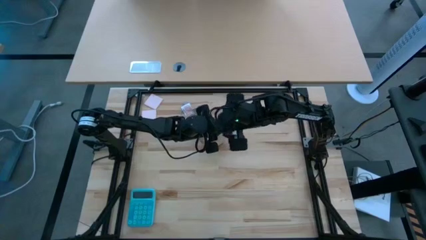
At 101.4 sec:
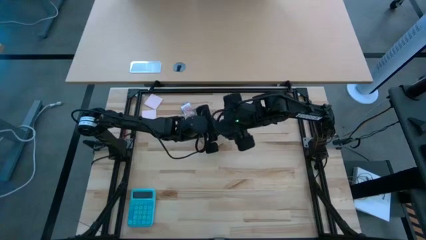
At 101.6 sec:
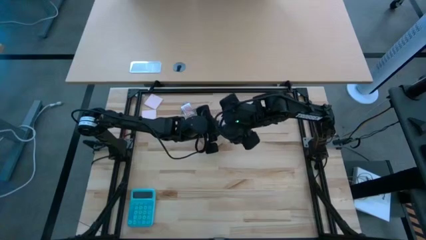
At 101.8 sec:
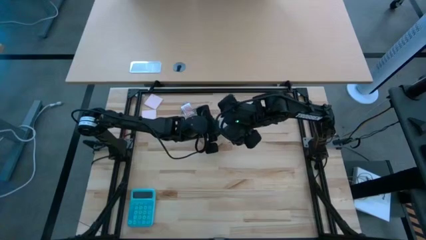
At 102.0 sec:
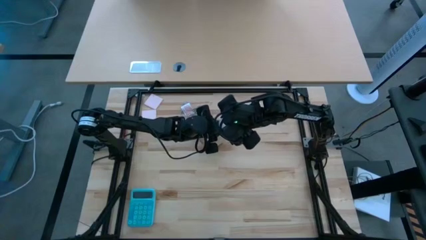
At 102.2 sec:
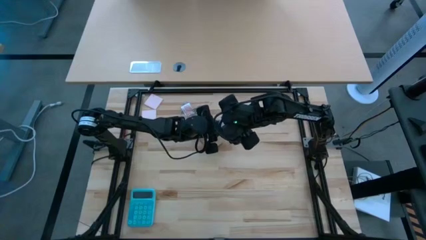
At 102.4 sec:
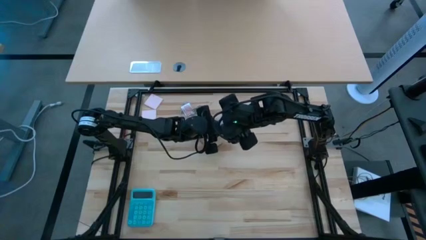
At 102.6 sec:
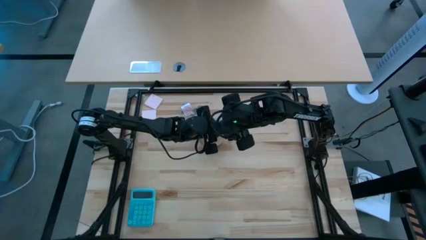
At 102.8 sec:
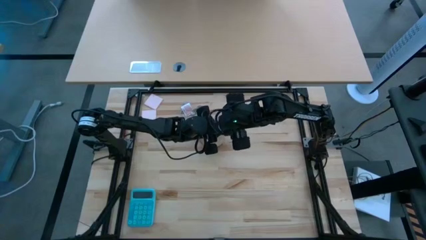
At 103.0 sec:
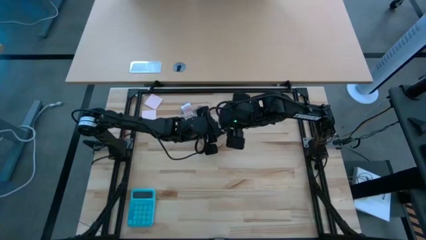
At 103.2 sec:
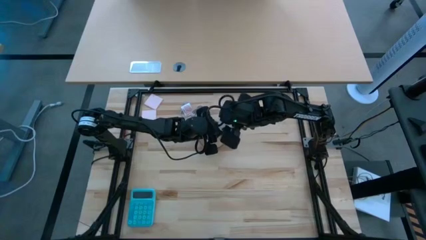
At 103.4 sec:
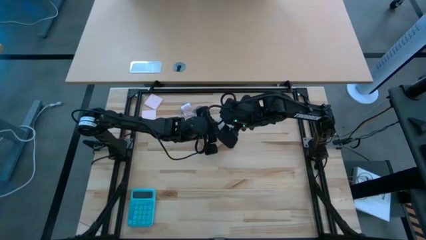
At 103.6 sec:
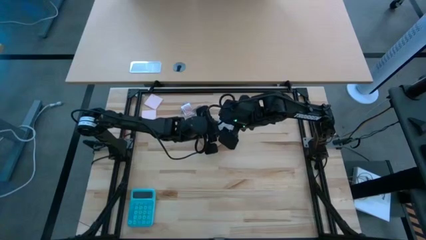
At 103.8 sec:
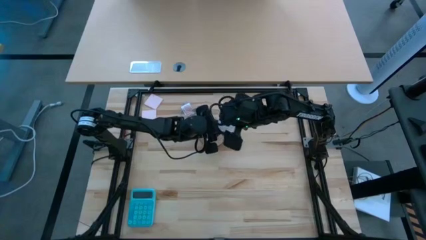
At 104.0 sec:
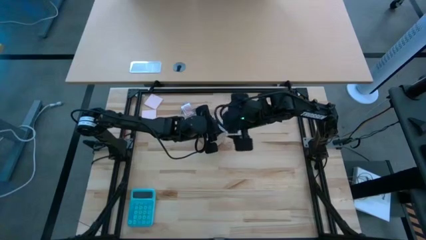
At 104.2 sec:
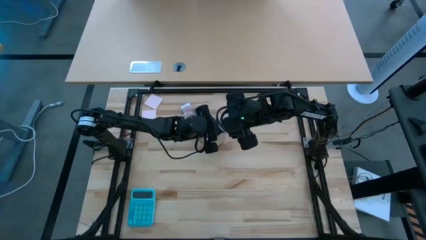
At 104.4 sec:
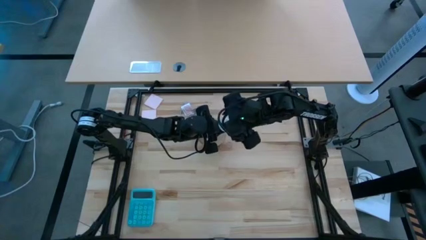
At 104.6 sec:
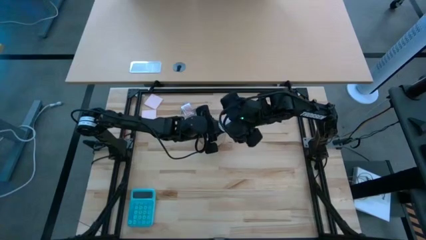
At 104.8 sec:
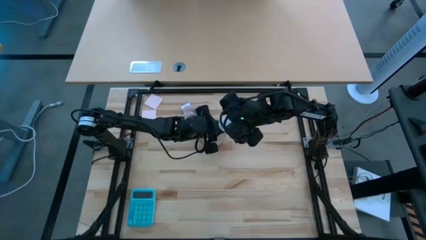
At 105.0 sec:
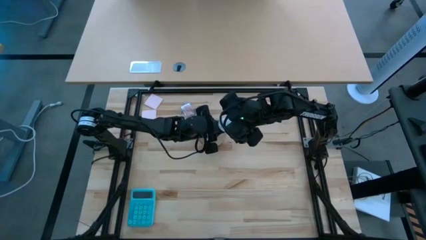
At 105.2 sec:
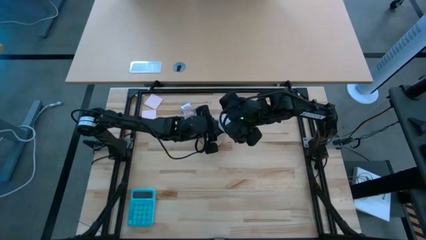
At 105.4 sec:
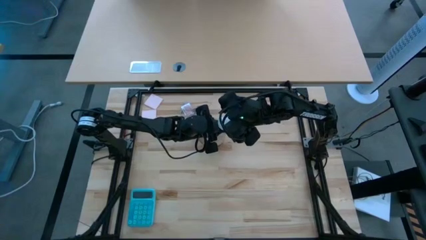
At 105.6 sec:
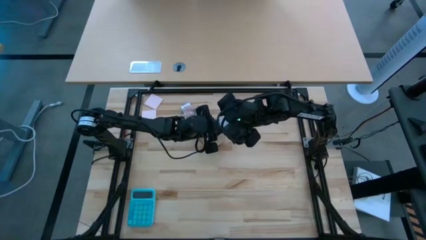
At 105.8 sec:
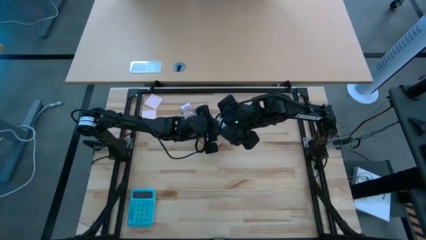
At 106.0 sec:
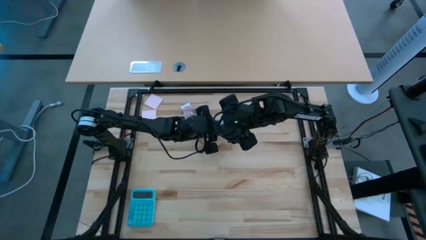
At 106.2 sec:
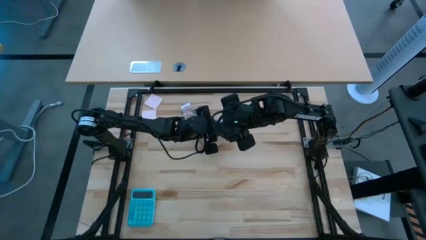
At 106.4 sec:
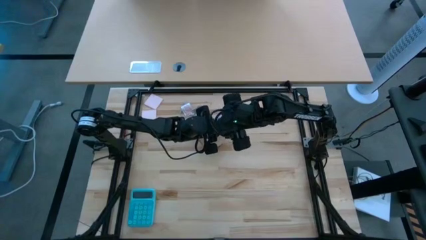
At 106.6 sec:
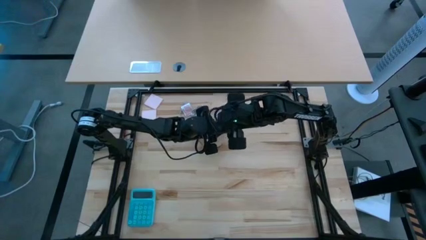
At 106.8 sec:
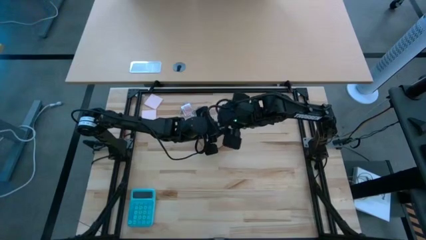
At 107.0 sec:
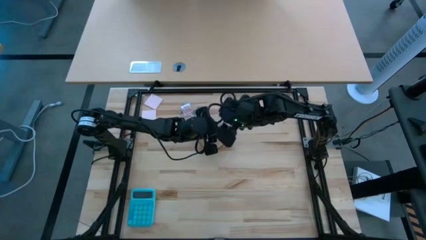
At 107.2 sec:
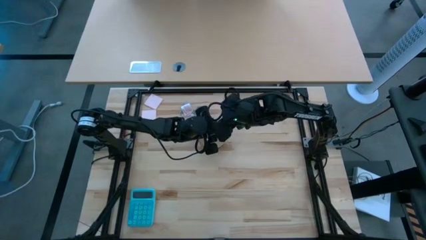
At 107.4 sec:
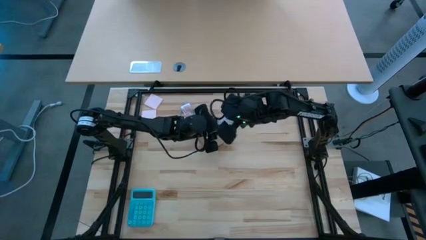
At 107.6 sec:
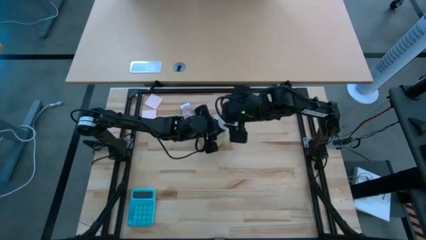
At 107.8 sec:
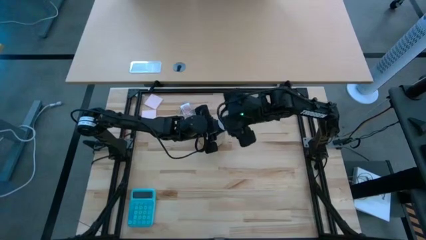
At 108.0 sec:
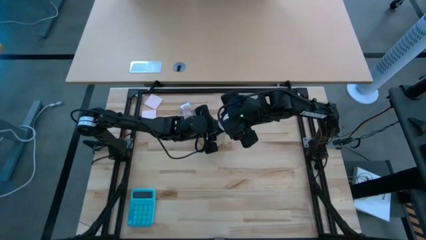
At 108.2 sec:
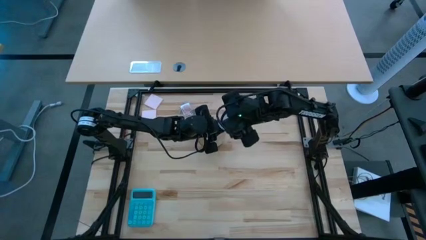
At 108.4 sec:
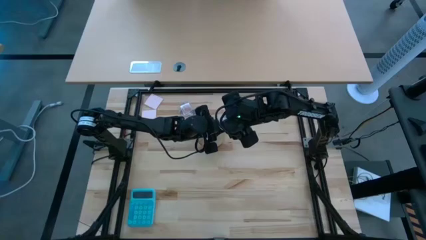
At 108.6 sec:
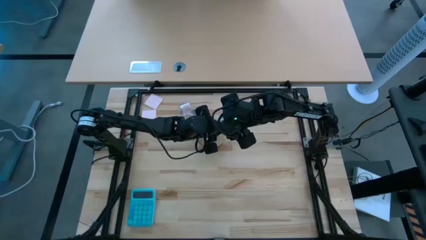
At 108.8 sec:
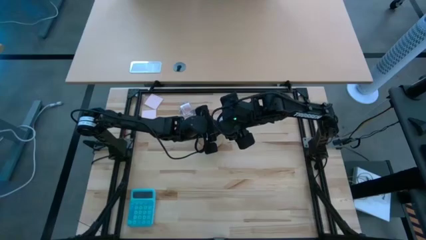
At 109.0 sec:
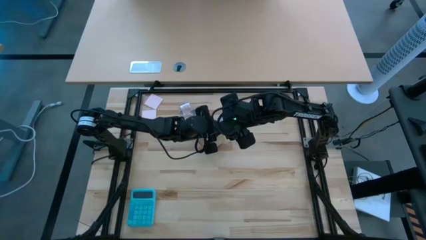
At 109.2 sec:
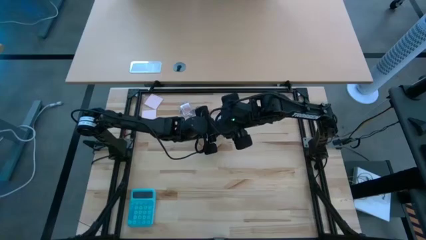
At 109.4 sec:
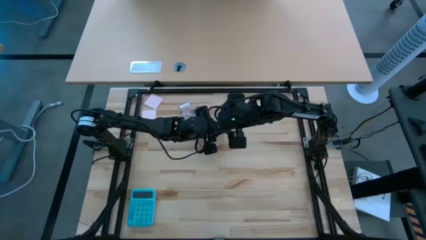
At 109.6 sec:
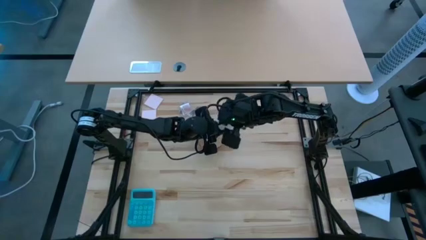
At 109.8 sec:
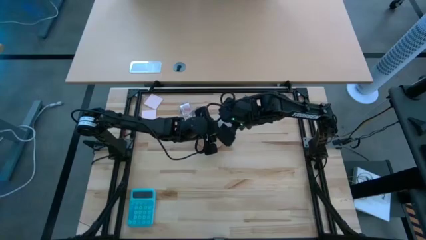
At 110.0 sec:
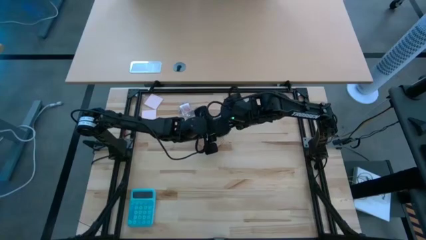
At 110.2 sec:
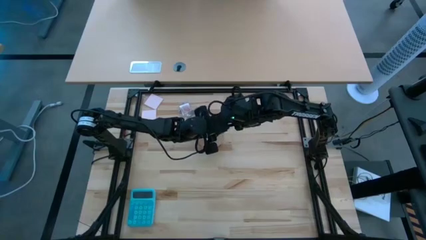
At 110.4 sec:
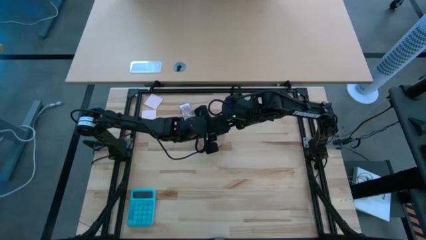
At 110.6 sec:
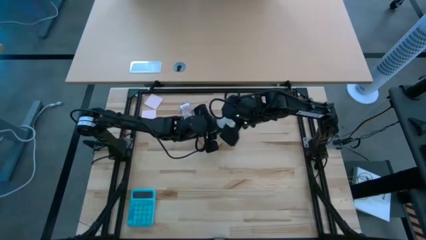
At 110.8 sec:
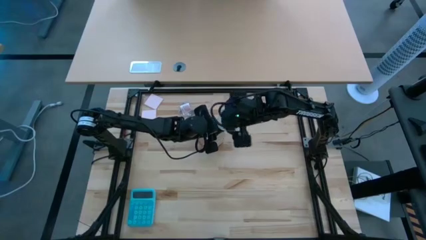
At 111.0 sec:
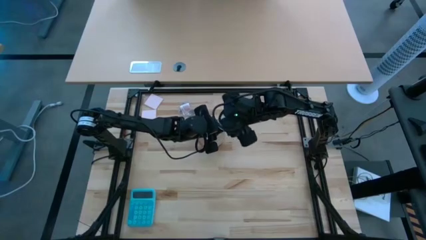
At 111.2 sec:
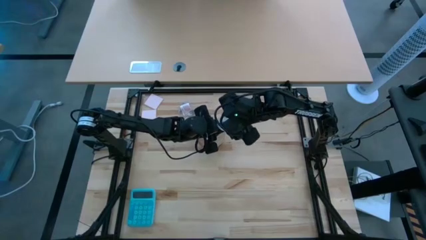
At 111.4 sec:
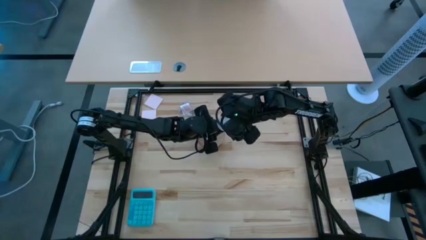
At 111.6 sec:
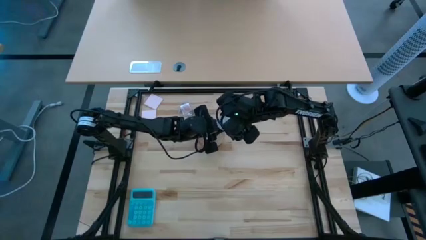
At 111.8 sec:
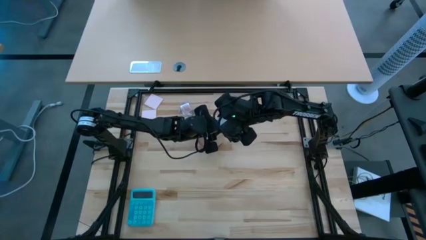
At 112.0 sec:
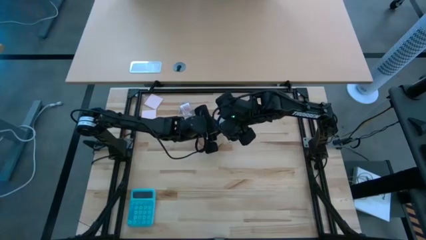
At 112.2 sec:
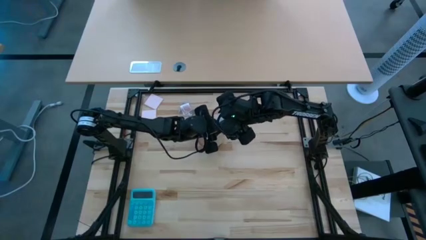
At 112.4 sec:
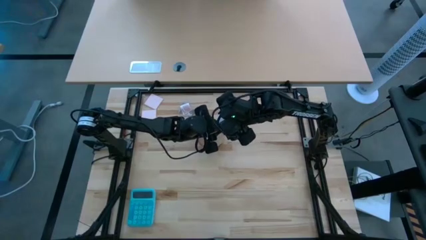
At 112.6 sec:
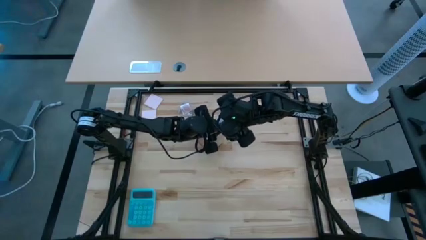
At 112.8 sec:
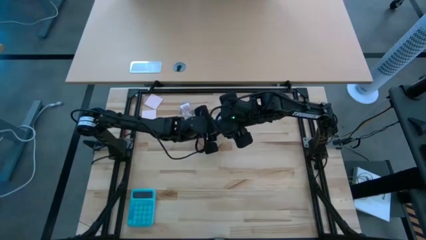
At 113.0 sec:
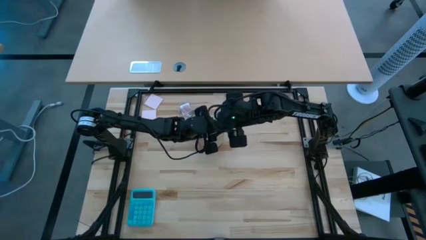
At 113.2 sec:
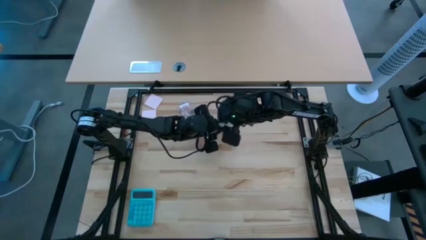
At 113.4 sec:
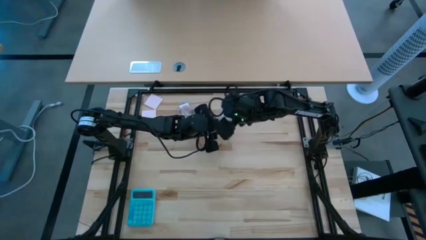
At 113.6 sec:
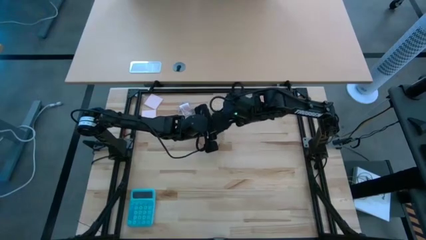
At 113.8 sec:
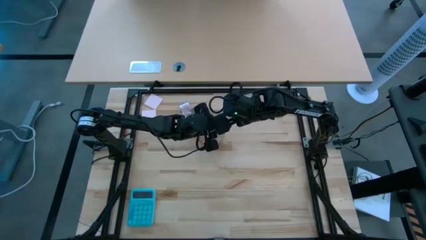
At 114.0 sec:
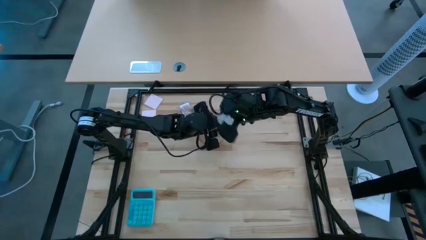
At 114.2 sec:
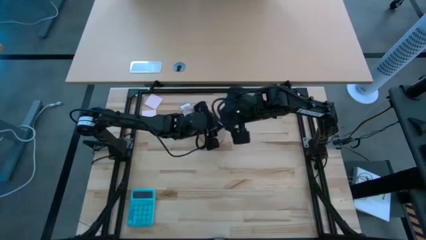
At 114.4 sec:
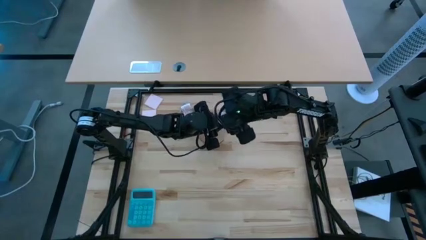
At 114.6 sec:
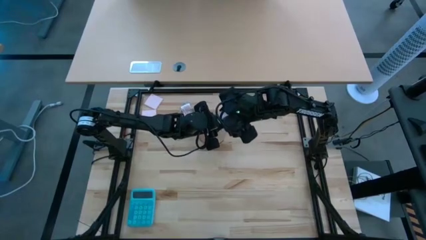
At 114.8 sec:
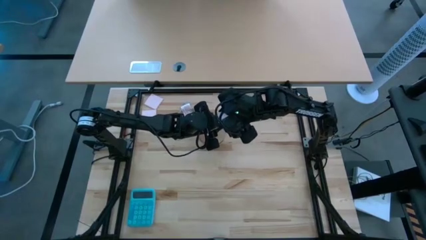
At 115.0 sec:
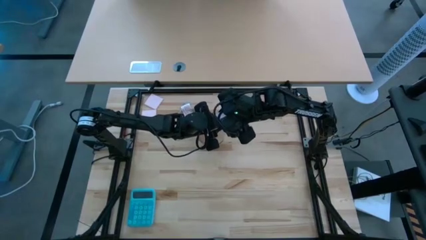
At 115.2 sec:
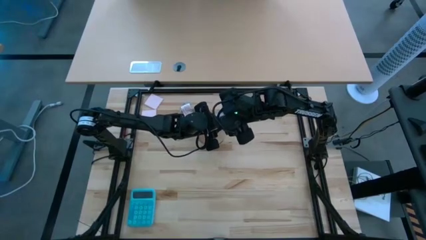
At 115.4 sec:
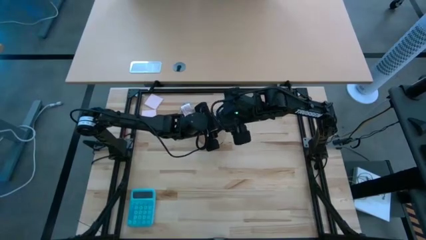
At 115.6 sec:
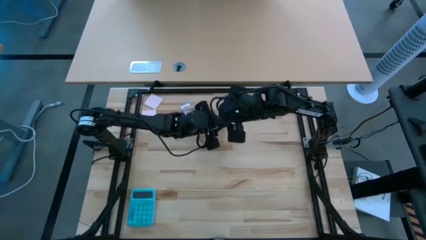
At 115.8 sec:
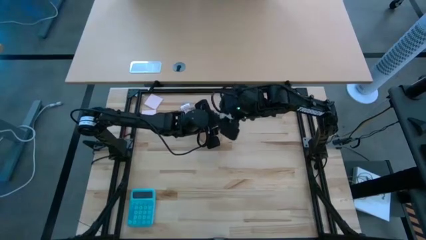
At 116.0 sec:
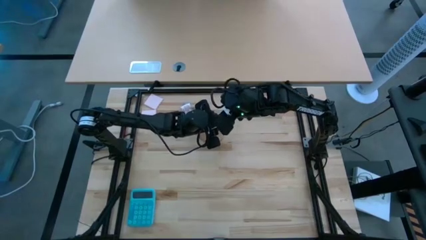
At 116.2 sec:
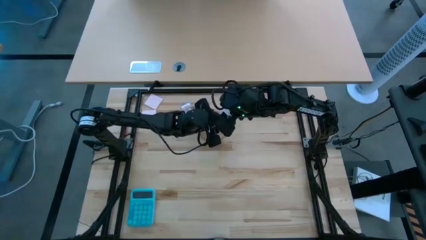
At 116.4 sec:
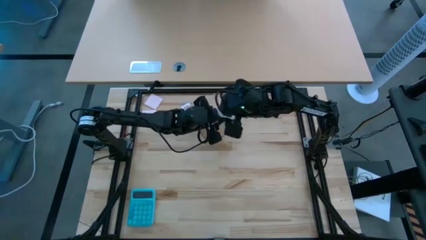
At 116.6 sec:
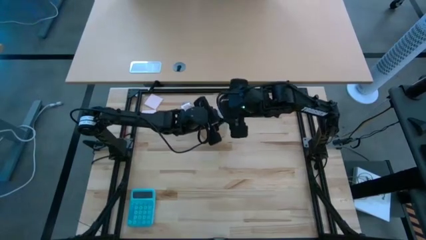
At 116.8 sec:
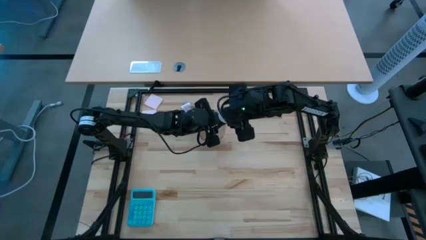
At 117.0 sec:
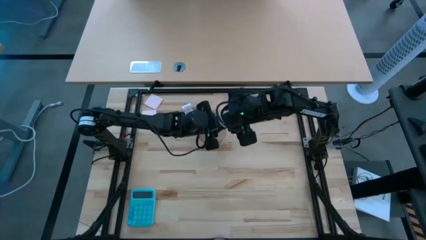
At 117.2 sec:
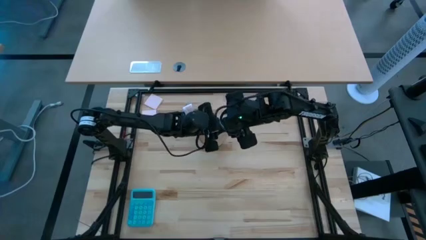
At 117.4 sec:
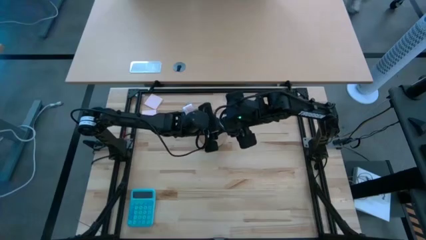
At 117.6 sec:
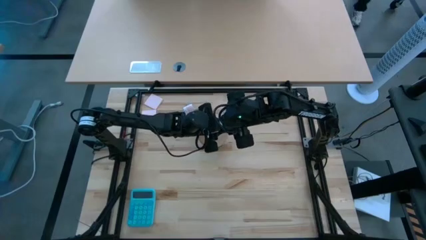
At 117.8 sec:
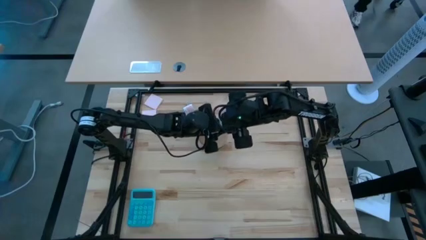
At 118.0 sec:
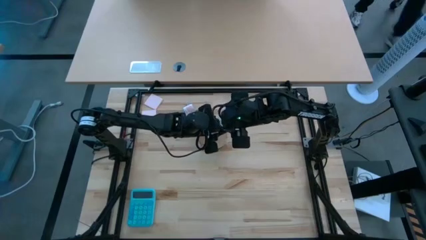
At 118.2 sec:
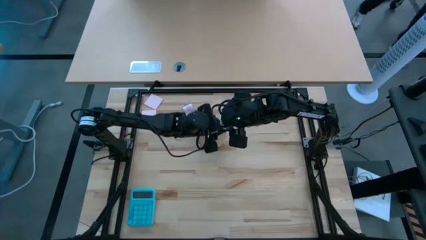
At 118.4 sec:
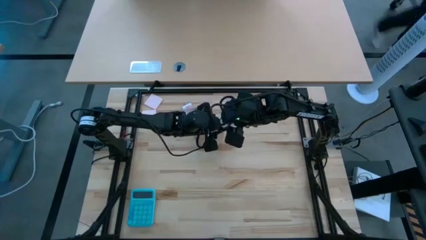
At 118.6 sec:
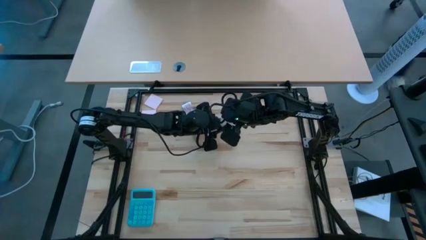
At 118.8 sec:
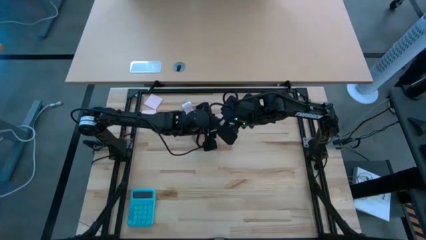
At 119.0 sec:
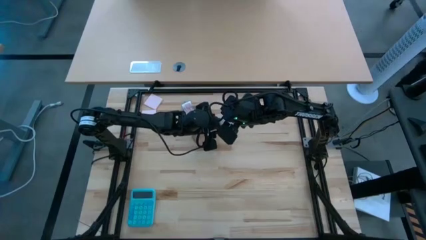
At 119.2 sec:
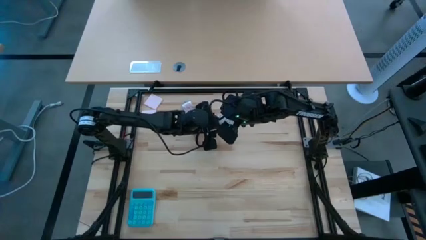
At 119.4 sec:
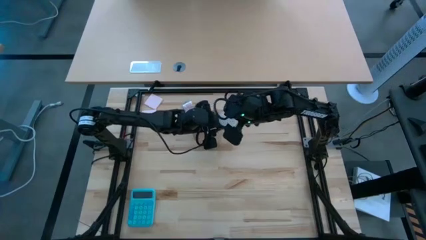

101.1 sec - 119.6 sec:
Task: Screw lightbulb
Insert the lightbulb into the lamp
